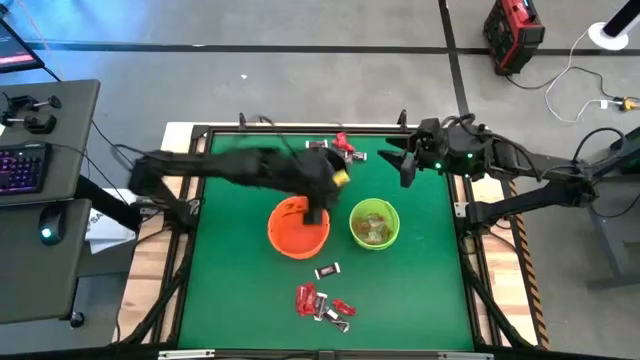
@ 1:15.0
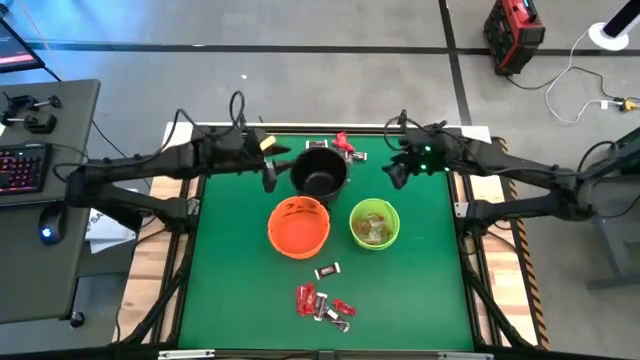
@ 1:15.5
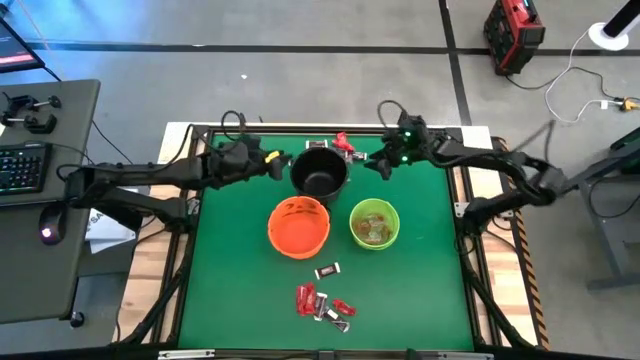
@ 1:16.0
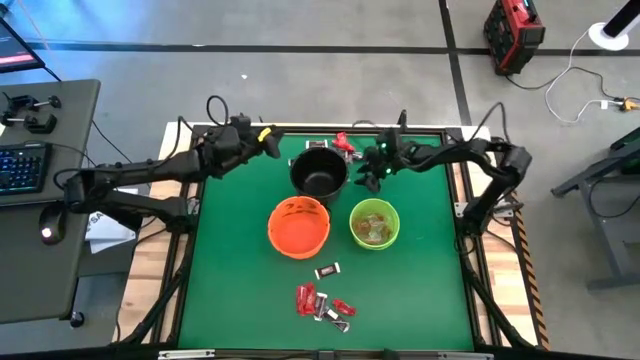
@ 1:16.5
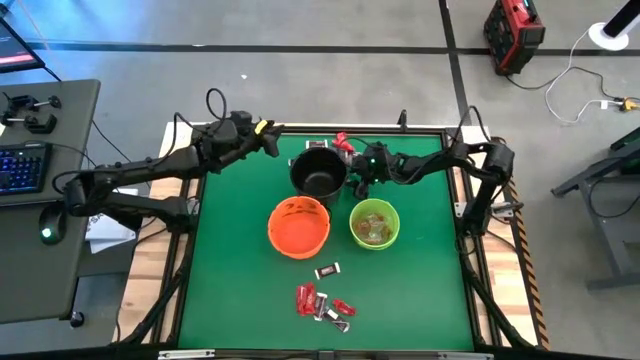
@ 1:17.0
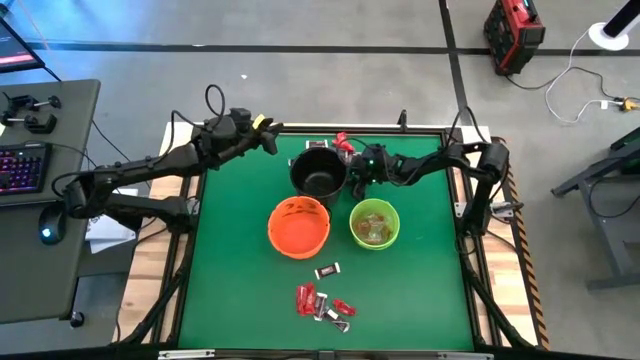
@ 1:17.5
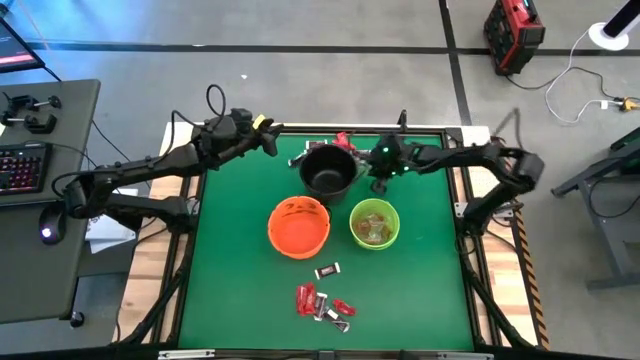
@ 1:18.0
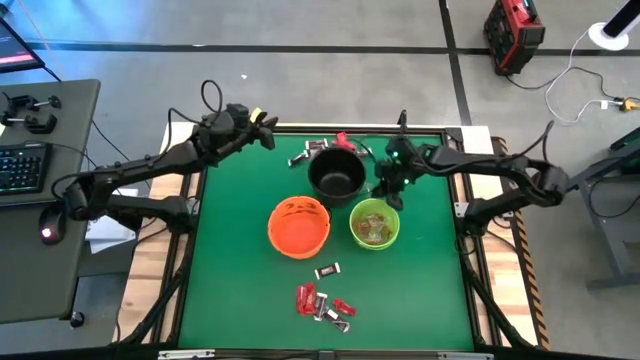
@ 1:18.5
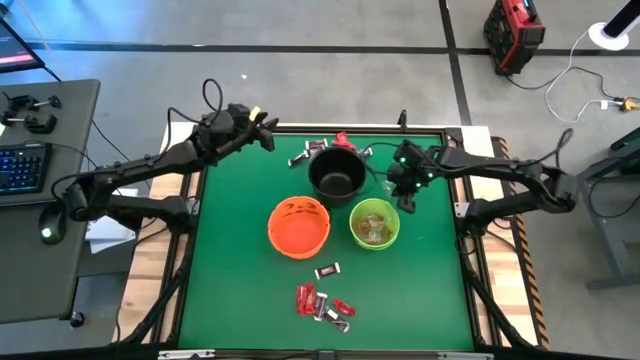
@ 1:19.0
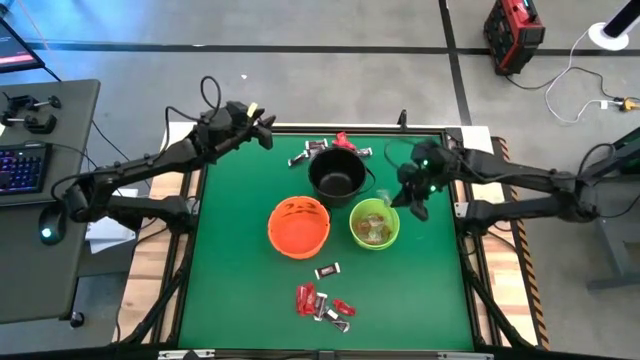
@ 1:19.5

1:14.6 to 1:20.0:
Task: Sort candy by brand, put in halloween buckets
Put the green gummy into the green bucket

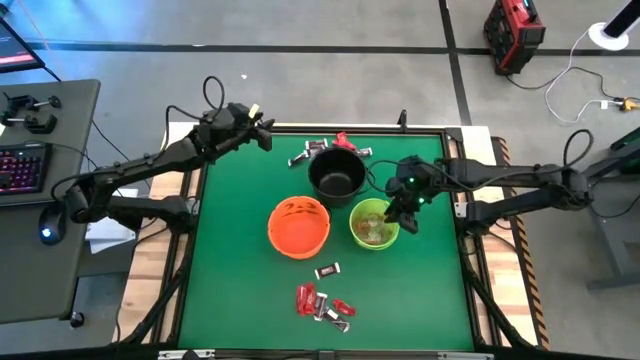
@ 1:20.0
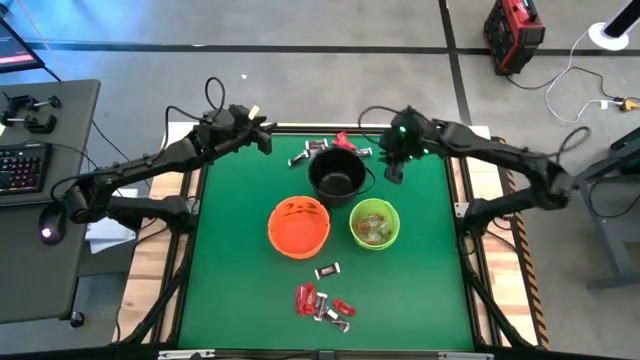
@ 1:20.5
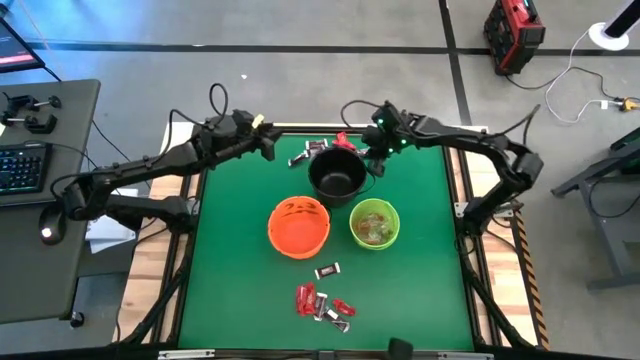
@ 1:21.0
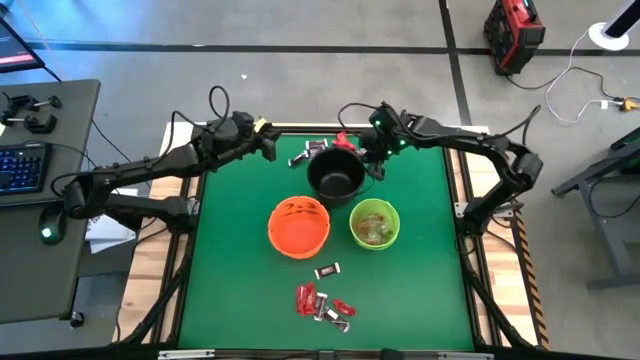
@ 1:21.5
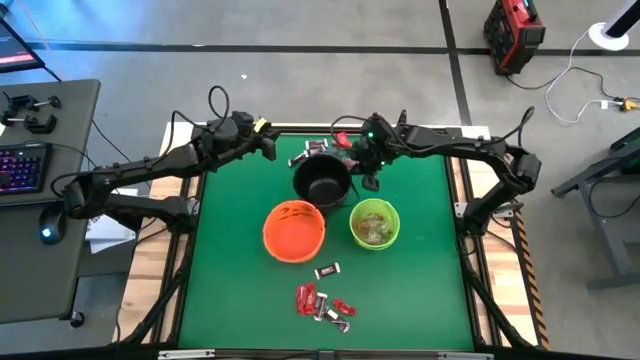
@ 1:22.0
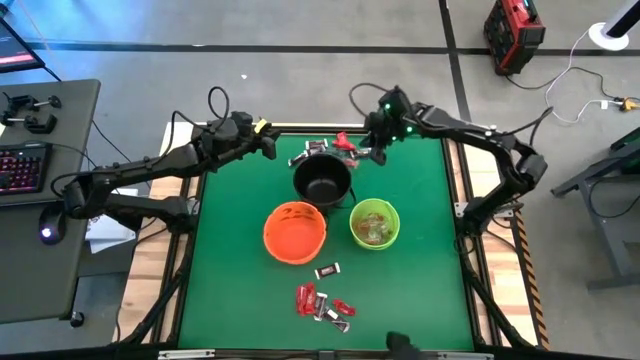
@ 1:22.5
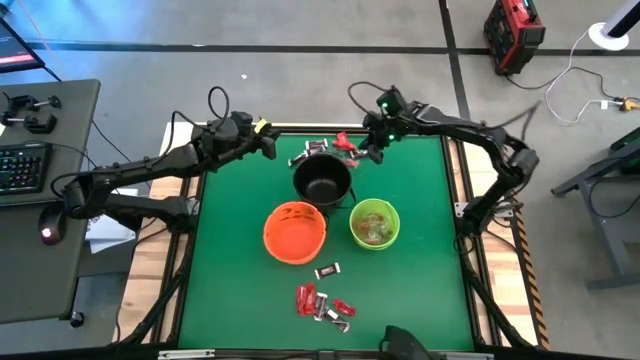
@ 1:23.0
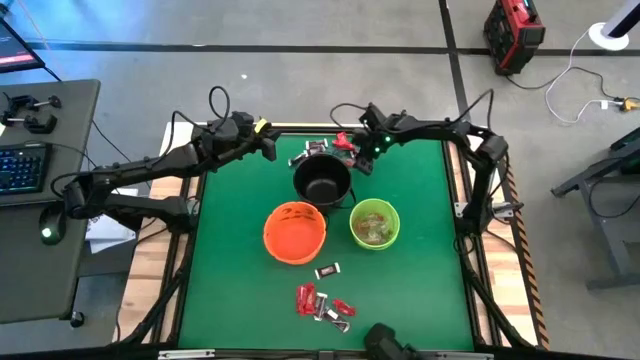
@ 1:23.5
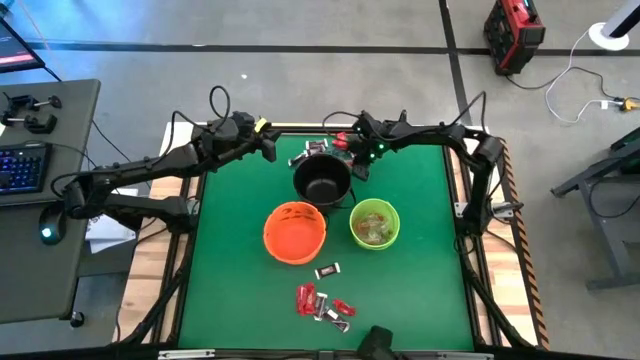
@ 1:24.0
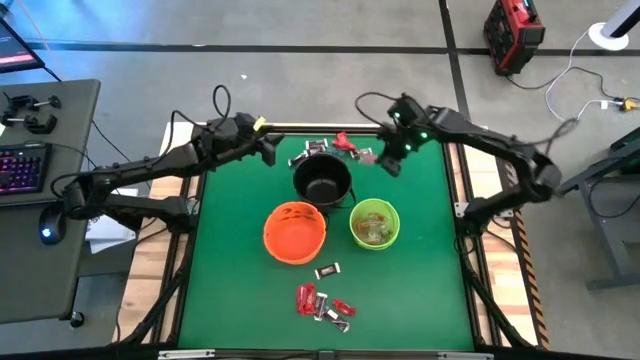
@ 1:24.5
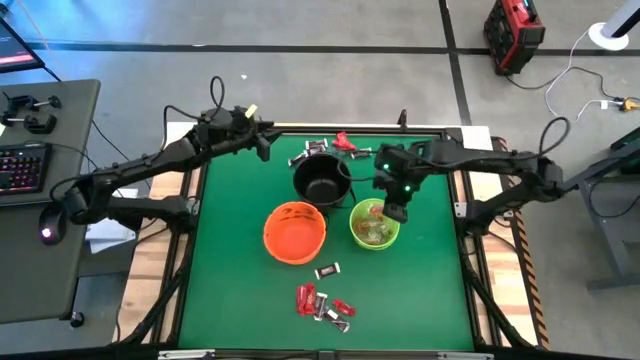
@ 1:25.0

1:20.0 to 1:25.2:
Put the red gummy into the green bucket

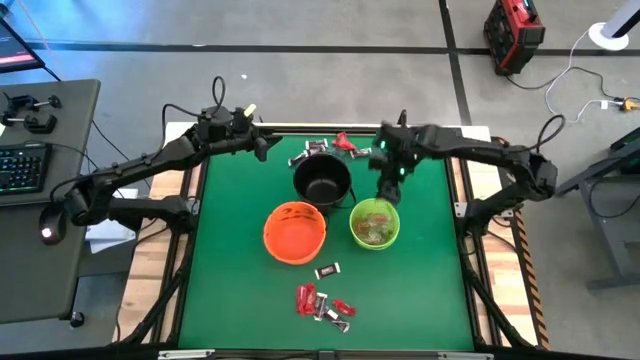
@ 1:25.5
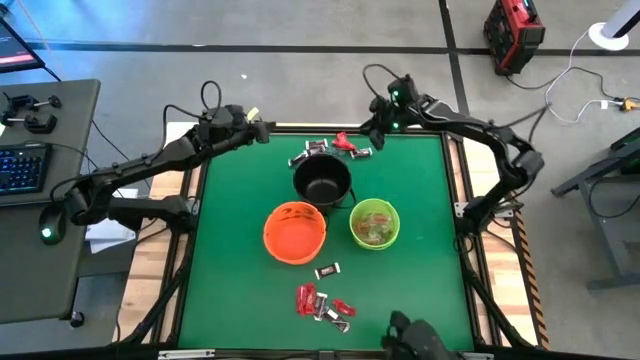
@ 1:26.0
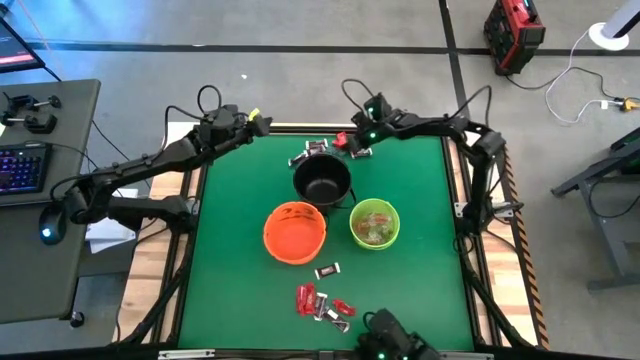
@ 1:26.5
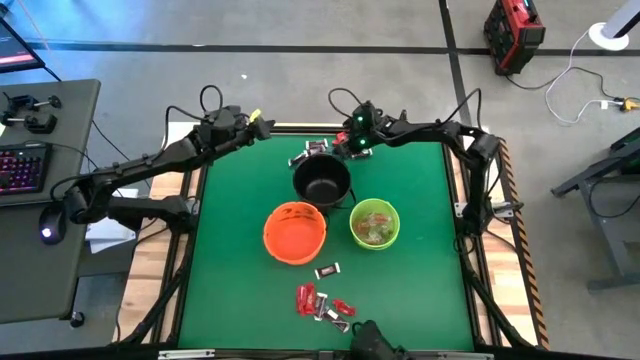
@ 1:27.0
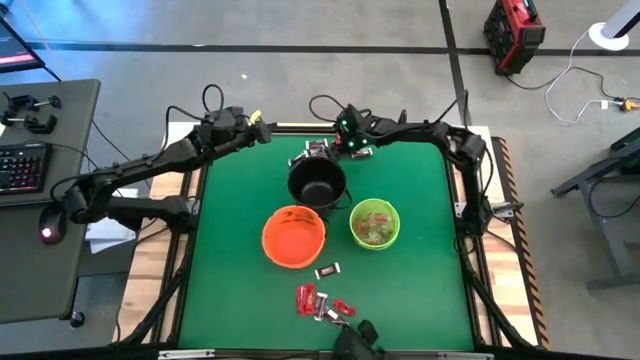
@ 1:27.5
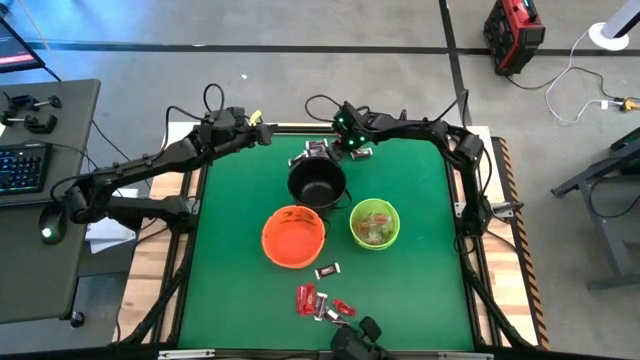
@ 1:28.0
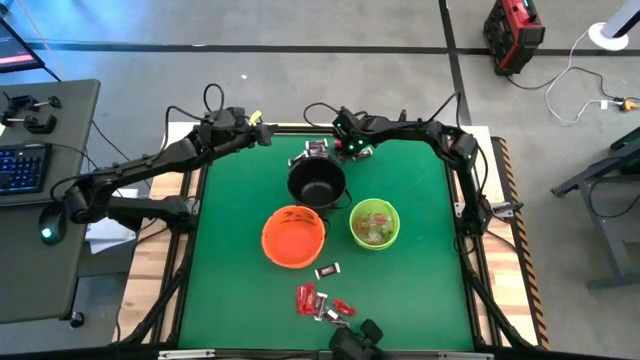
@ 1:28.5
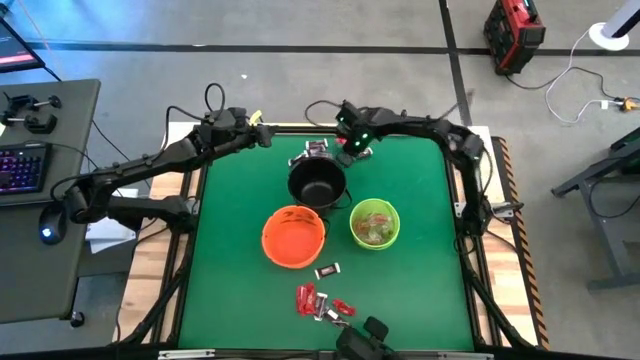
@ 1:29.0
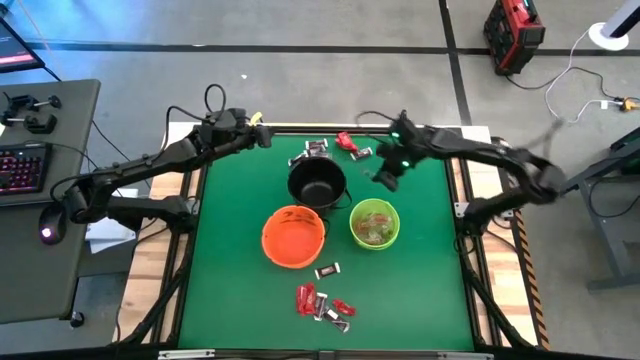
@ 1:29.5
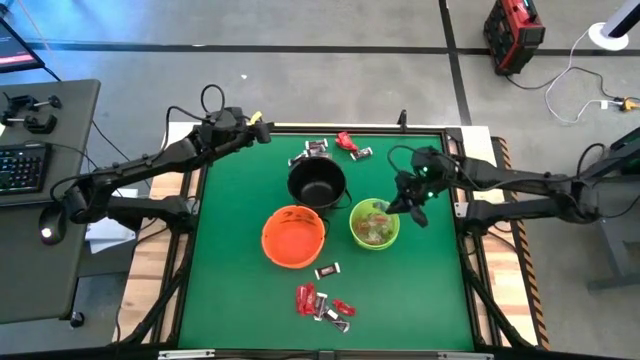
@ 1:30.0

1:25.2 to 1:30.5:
Put the blue gummy into the green bucket

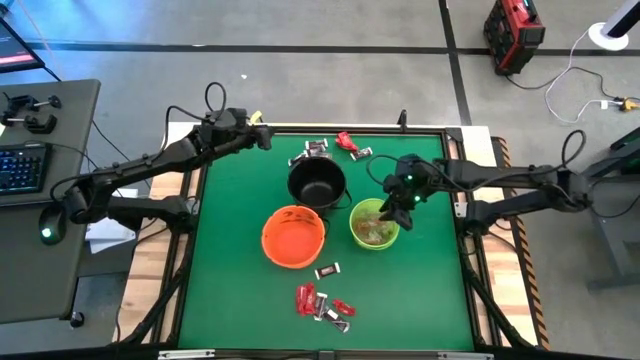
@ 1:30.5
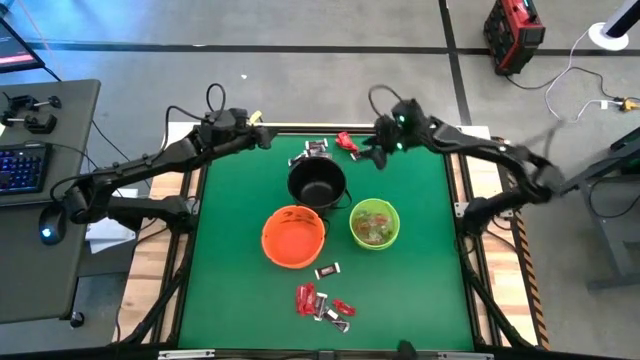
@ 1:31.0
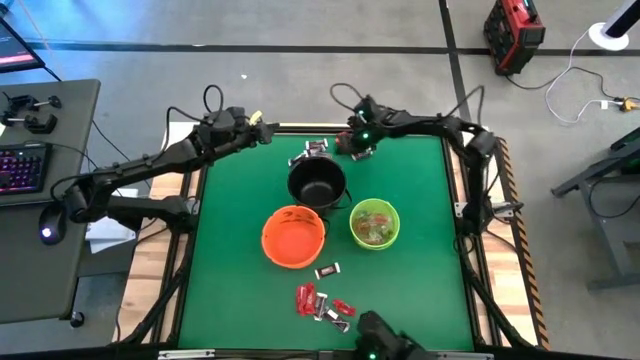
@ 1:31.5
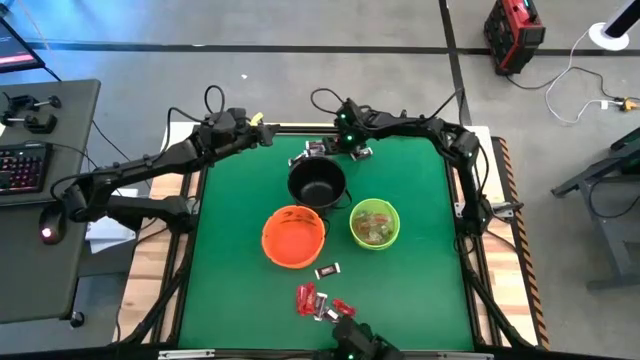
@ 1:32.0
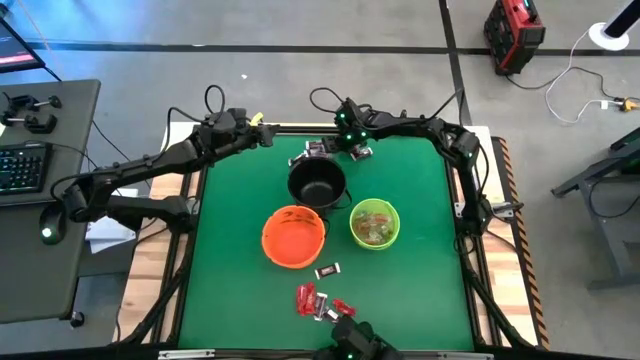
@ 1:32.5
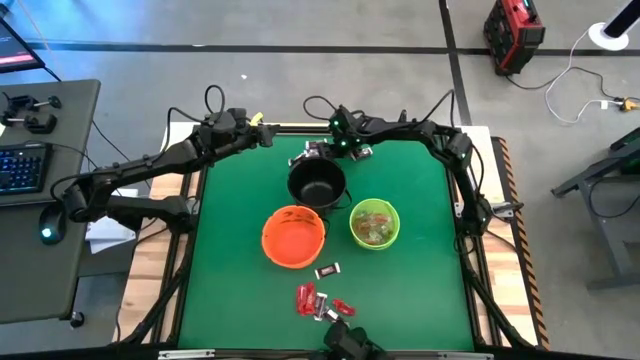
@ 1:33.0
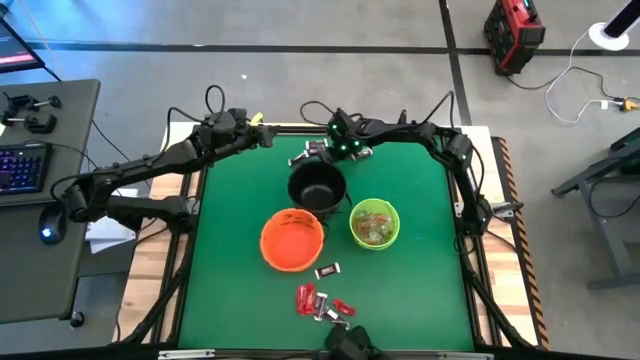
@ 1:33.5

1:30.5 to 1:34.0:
Put the orange gummy into the green bucket

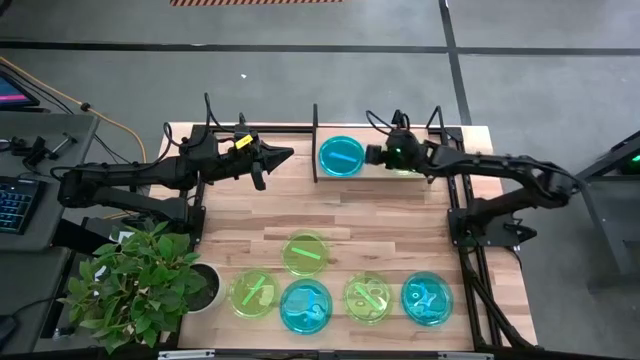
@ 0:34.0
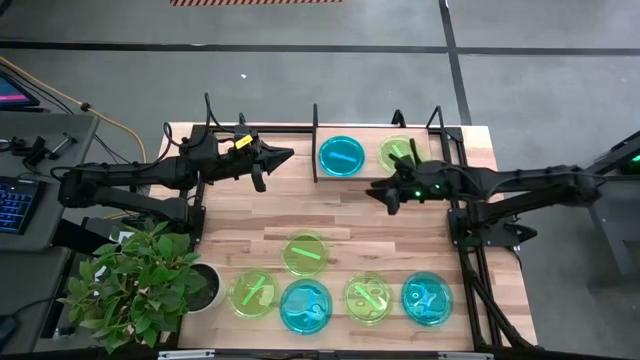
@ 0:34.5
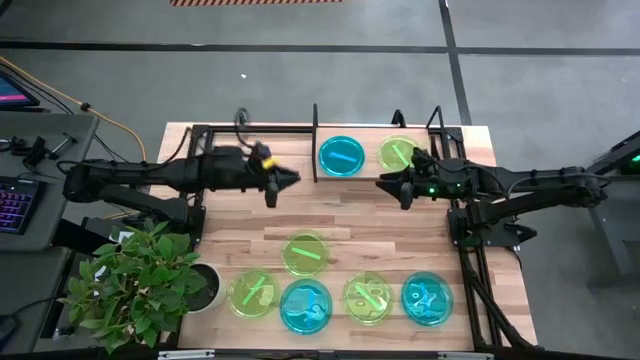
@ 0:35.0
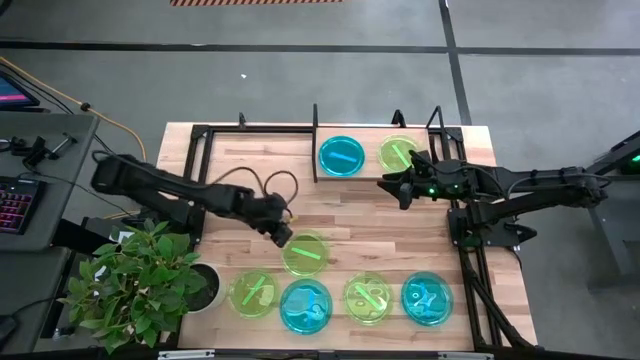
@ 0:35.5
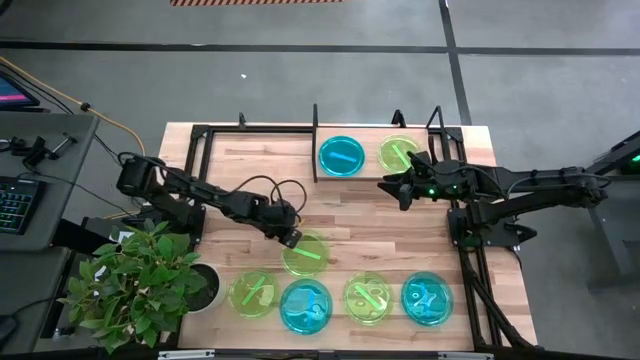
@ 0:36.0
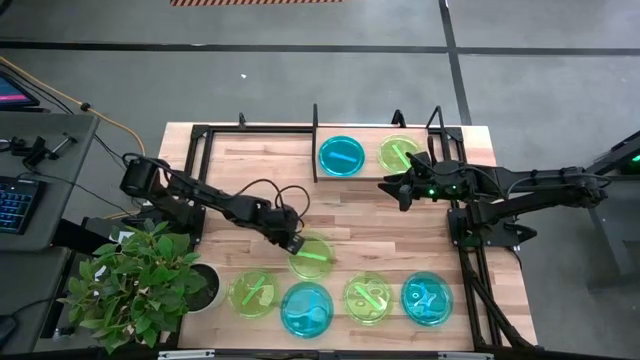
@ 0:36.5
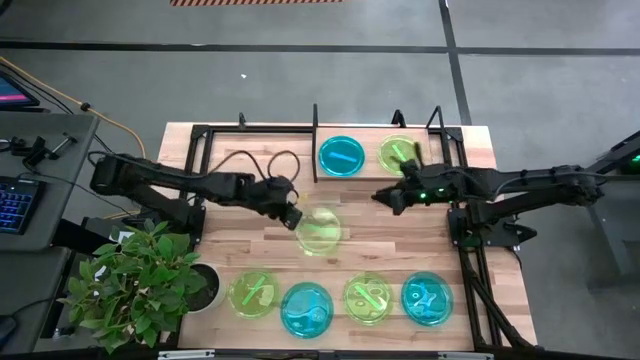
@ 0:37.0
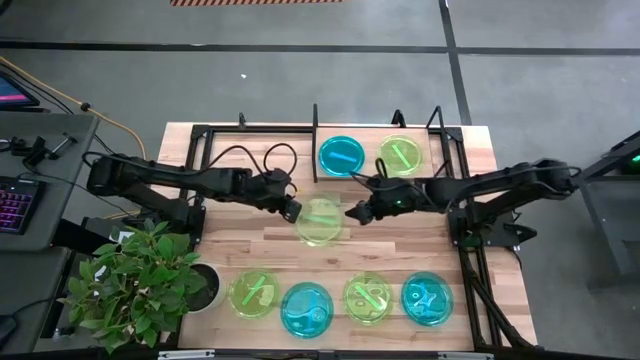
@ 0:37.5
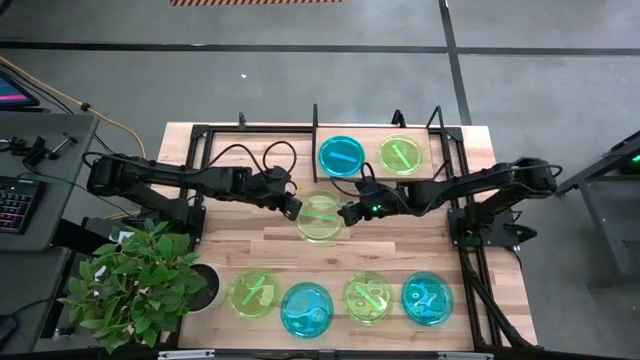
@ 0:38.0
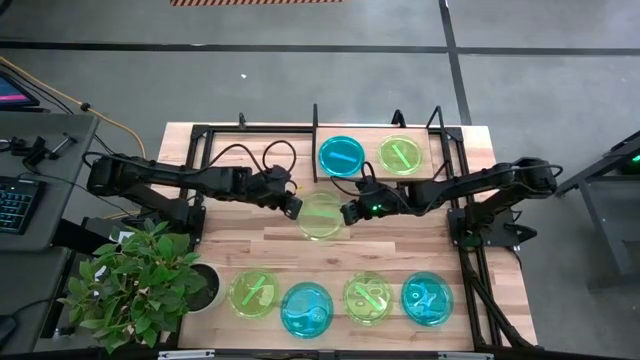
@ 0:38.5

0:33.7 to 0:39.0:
Task: Place and stack plates onto a shelf
Stack the top green plate on top of the green plate on the shelf
